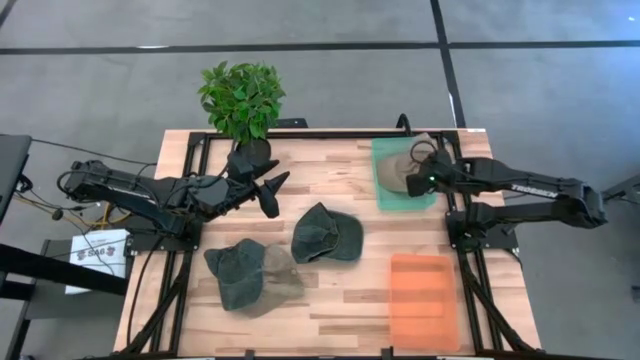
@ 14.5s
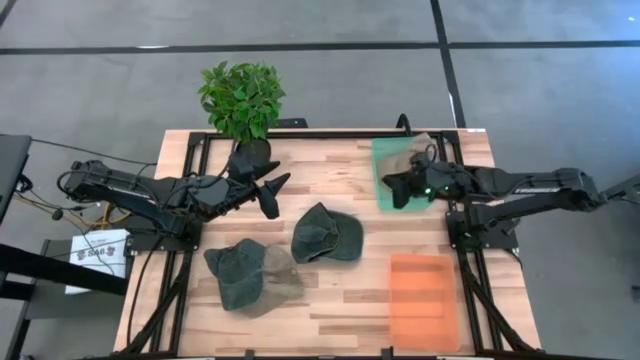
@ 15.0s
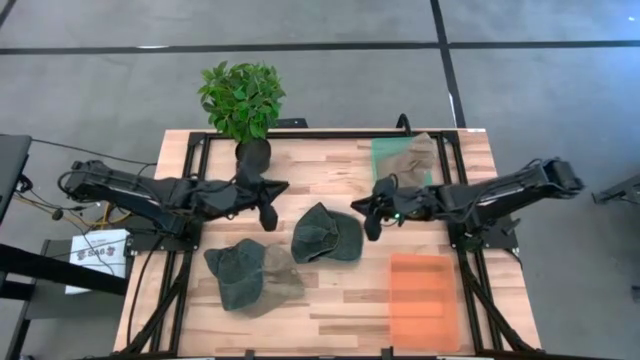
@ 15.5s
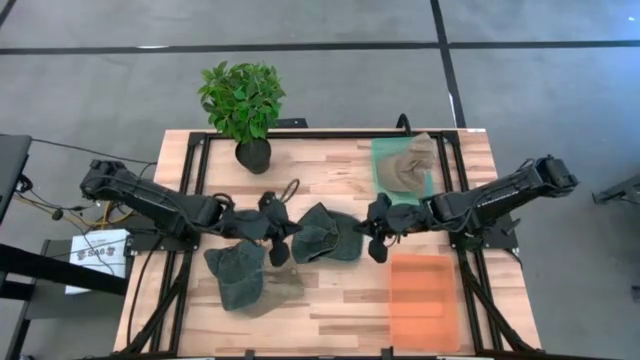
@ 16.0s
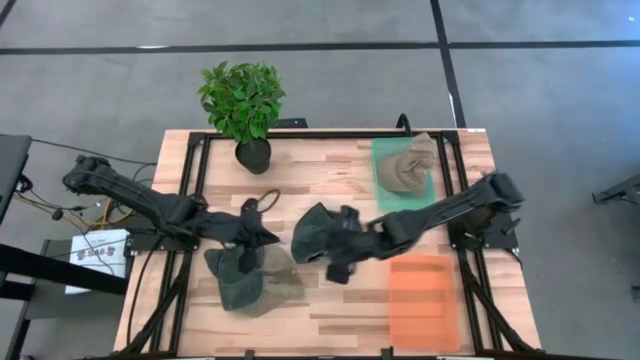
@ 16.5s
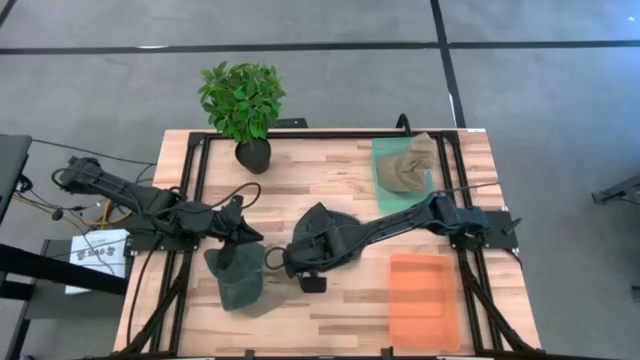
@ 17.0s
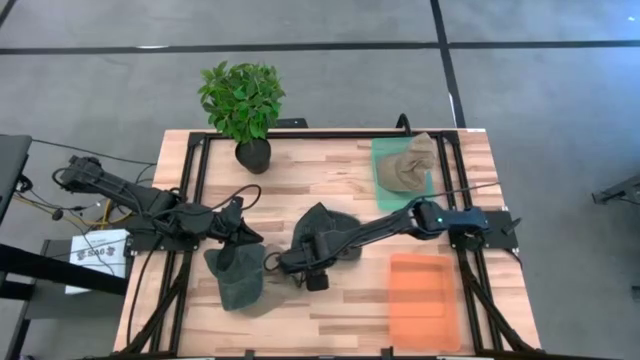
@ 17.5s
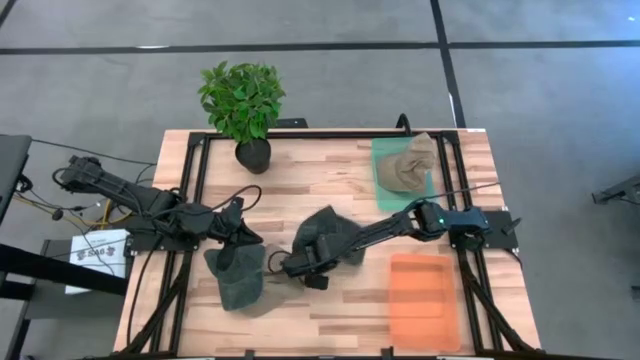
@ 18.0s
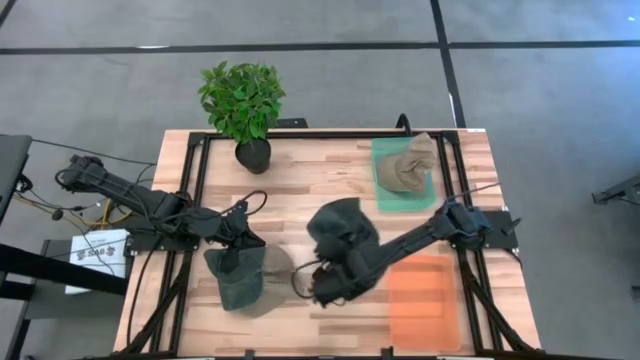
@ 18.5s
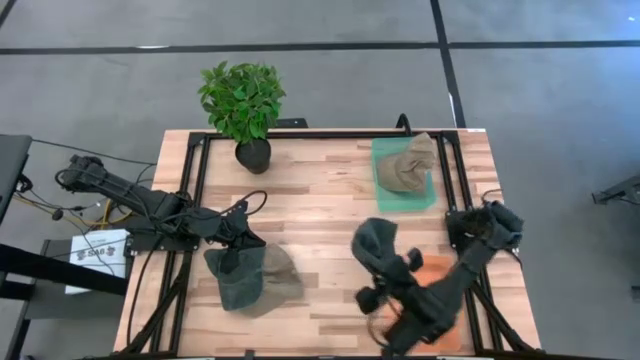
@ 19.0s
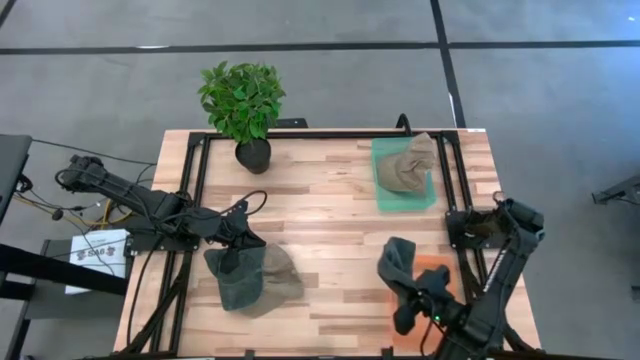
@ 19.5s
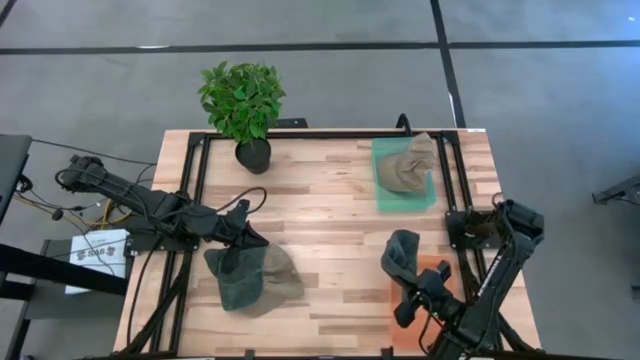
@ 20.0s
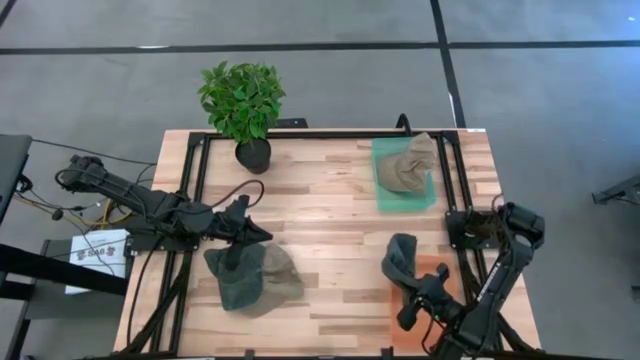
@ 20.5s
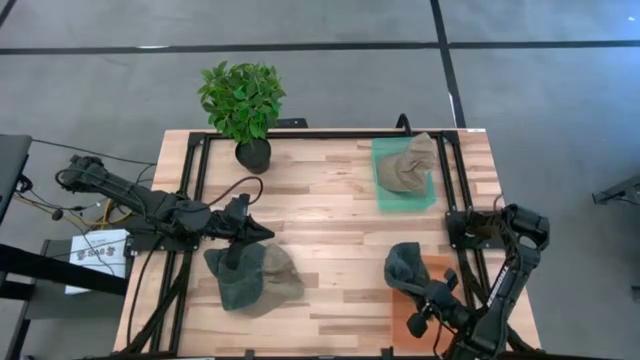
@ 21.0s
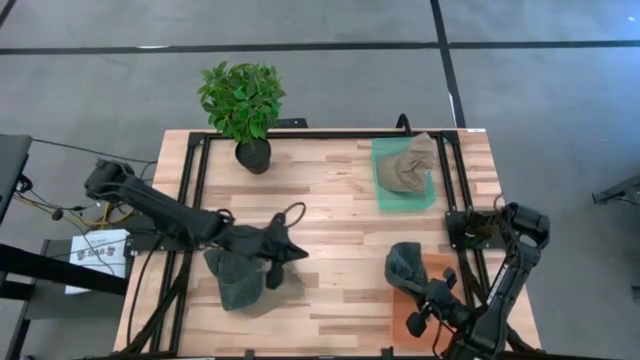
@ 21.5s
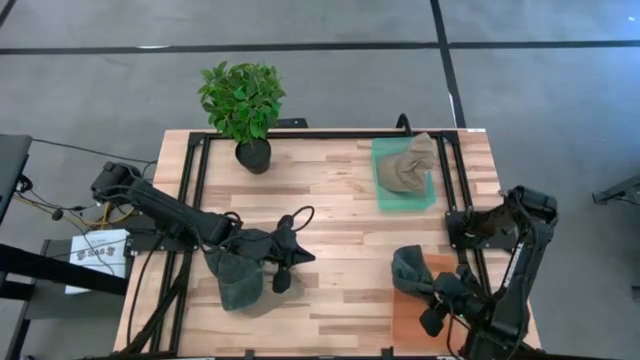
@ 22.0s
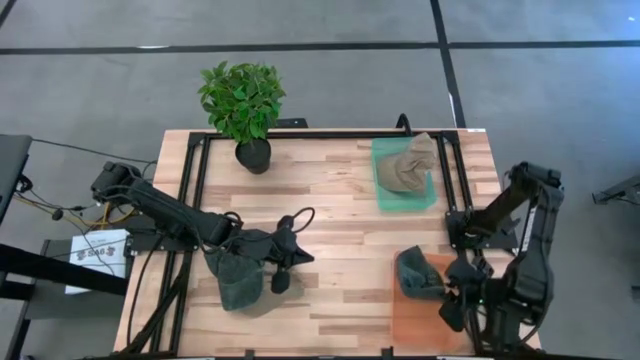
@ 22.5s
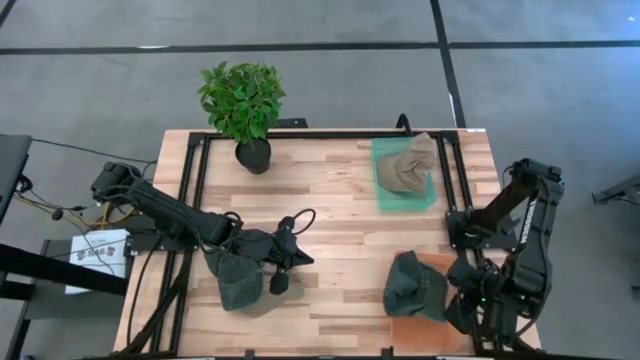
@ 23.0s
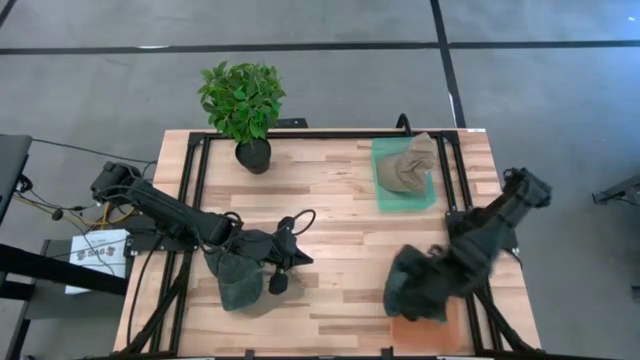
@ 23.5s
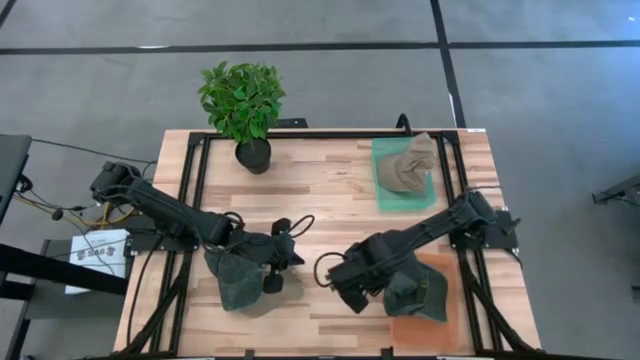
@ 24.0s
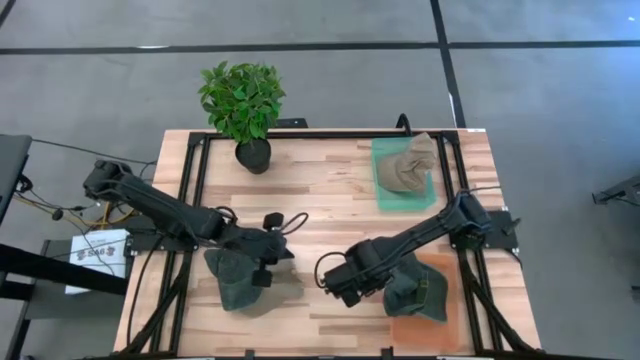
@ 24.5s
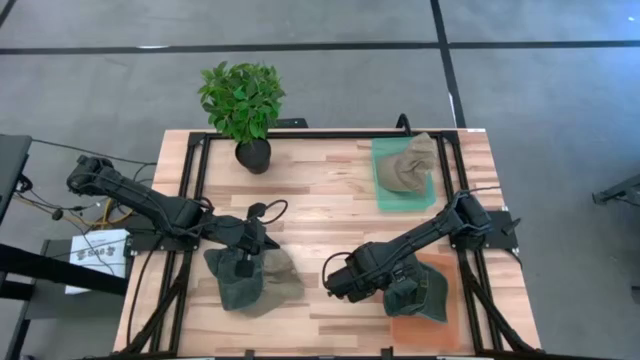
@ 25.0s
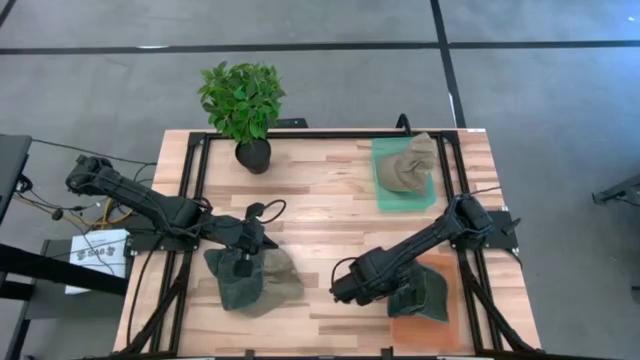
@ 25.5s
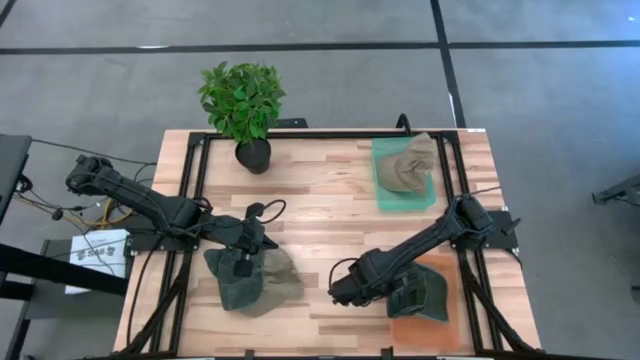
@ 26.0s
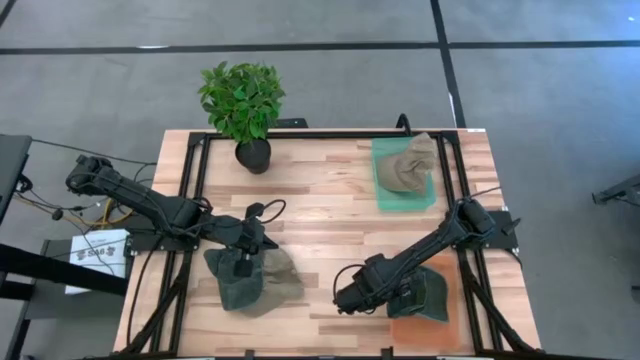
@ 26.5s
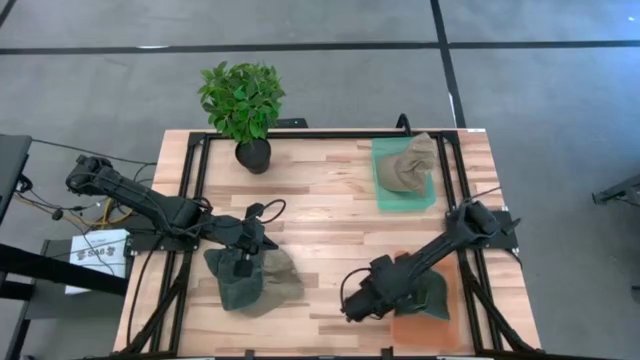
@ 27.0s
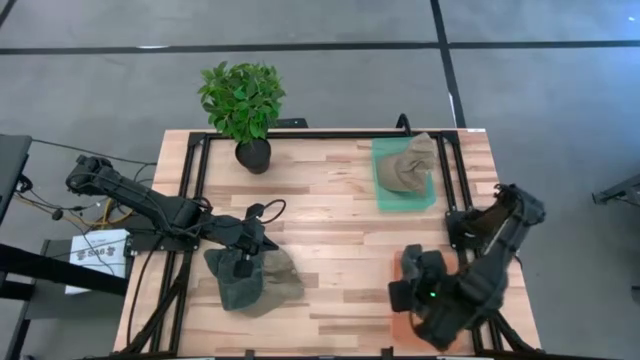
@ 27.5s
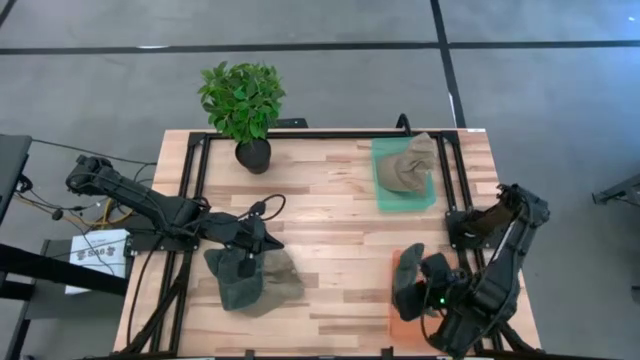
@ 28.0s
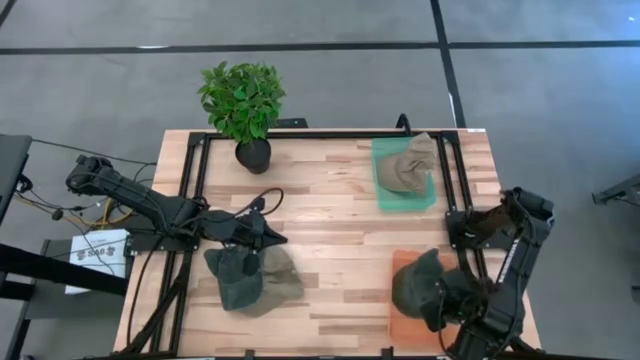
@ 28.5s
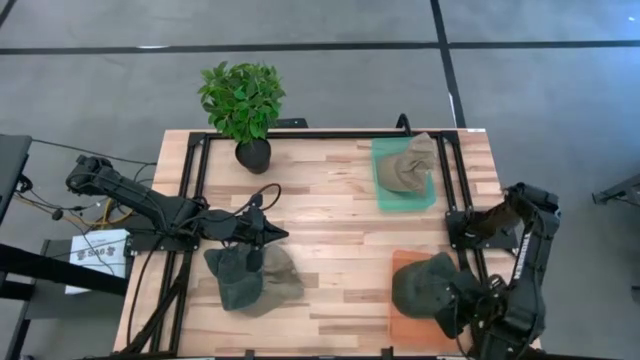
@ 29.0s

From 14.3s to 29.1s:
Task: Pick & Place hat
Put the right black cap into the orange bin

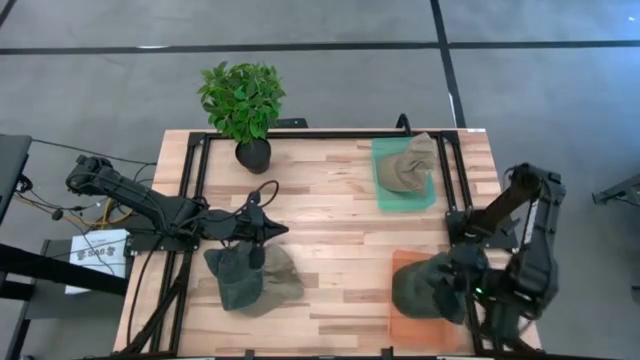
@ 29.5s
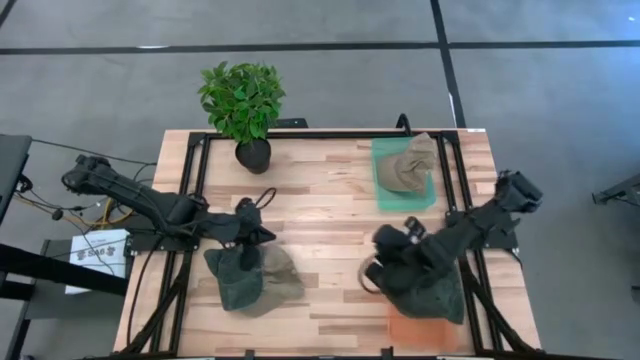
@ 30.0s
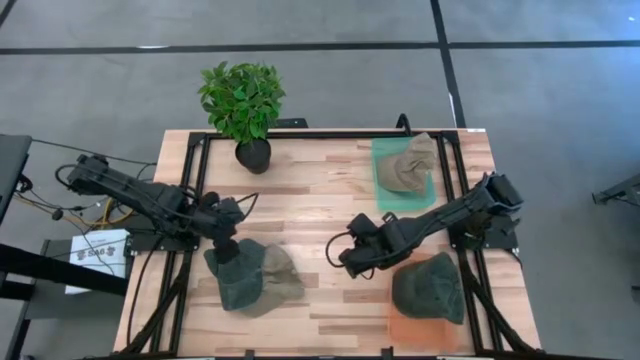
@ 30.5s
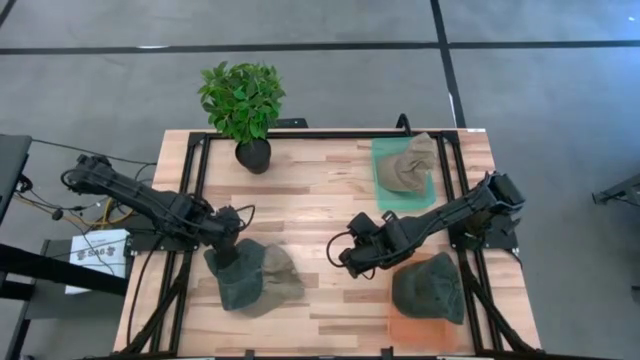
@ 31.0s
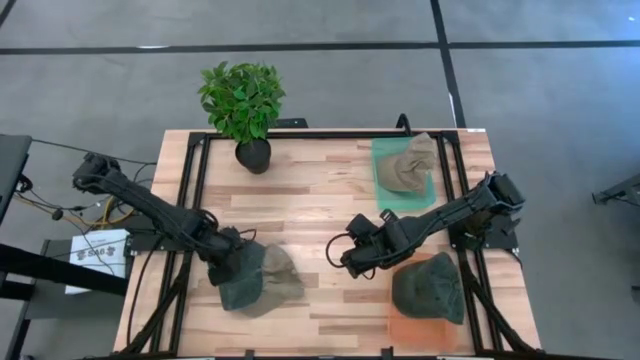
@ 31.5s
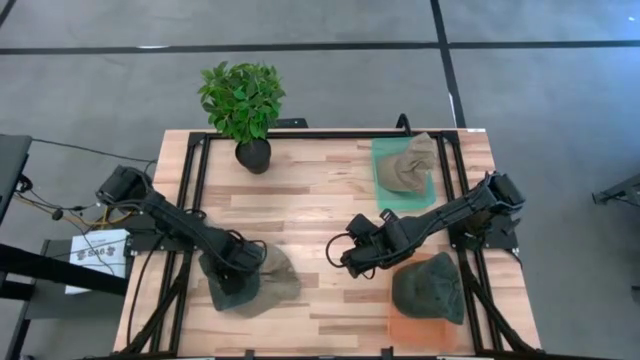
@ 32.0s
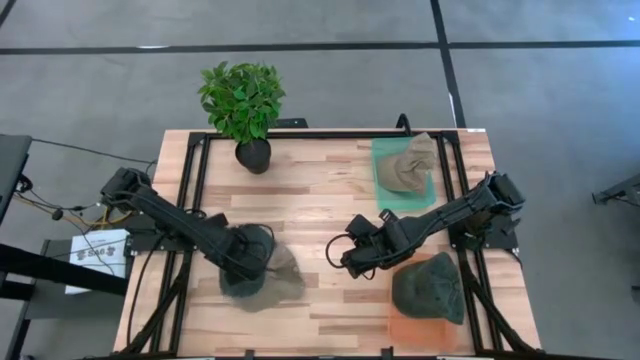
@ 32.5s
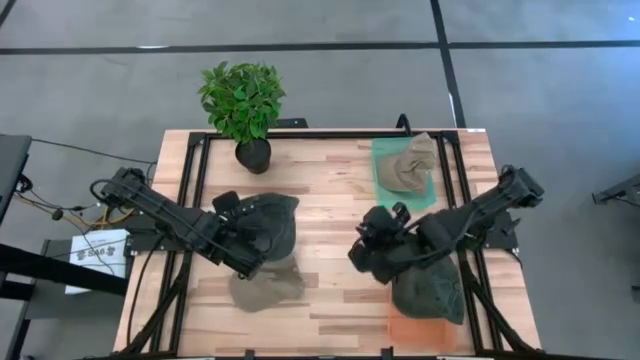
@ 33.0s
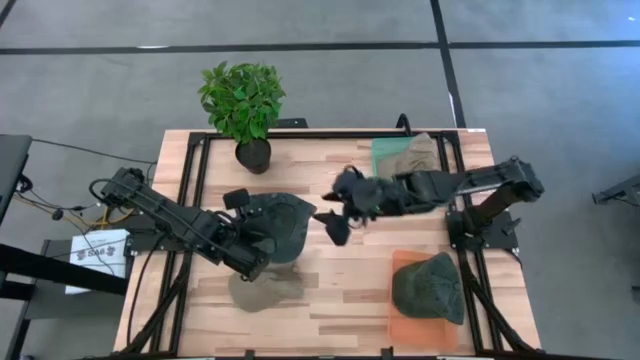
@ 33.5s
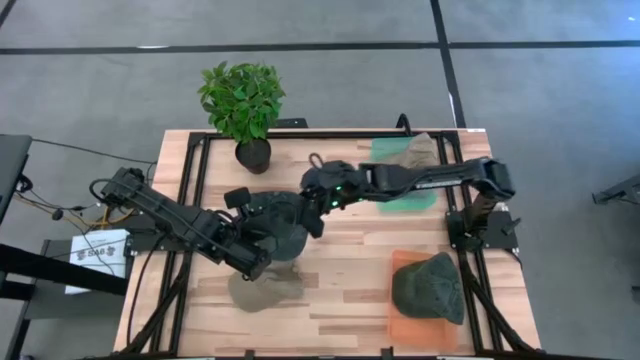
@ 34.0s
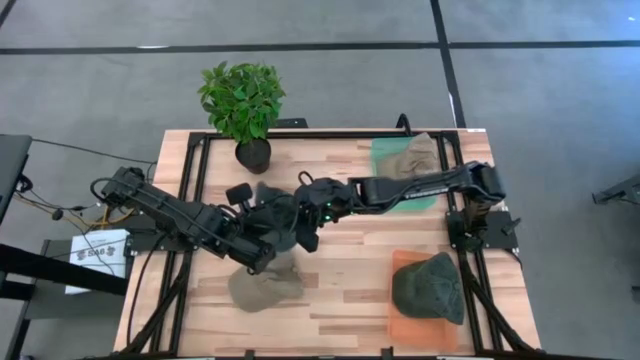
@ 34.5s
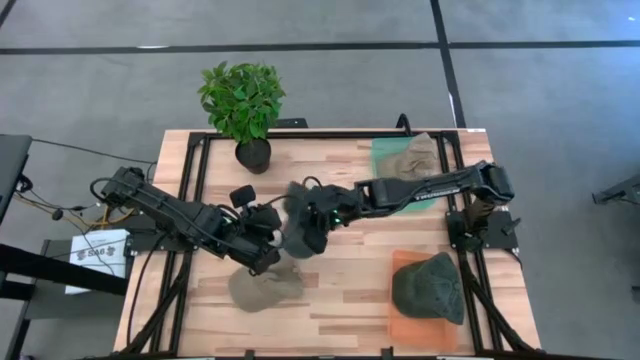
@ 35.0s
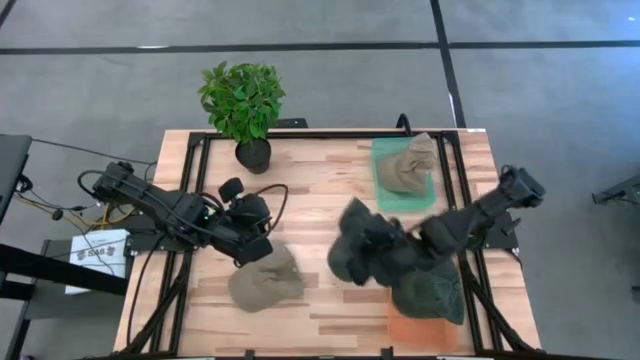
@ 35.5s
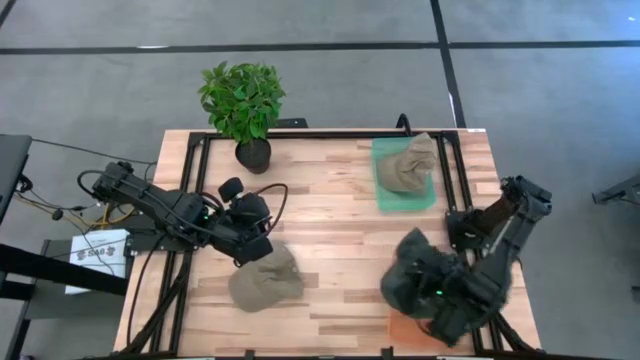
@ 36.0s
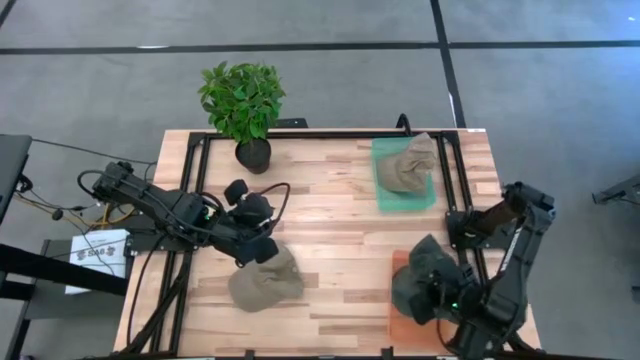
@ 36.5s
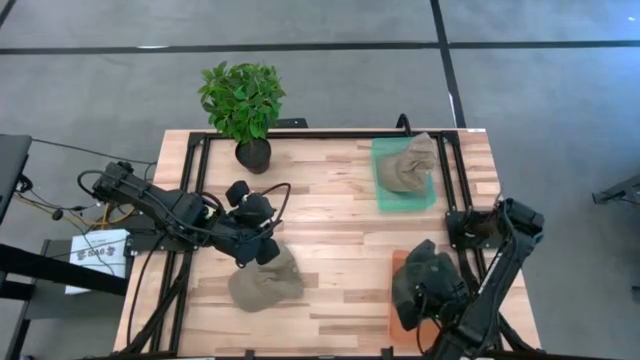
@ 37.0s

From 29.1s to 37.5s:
Put the black cap into the orange bin
